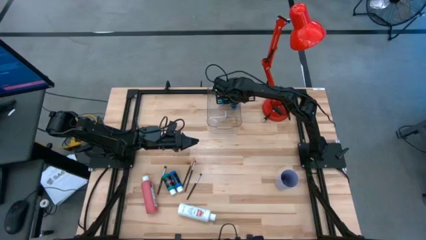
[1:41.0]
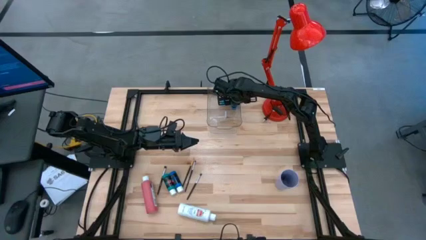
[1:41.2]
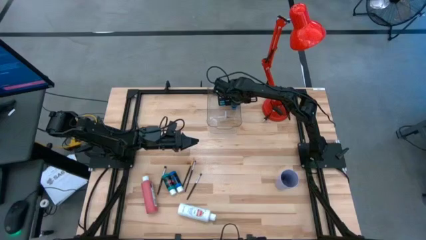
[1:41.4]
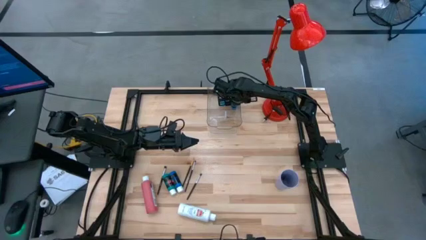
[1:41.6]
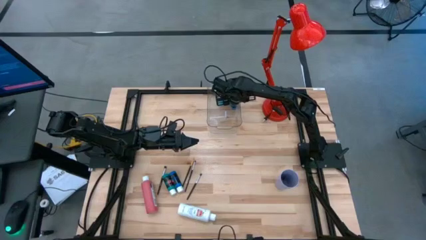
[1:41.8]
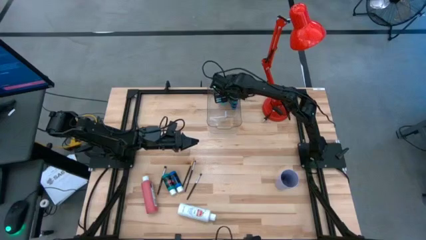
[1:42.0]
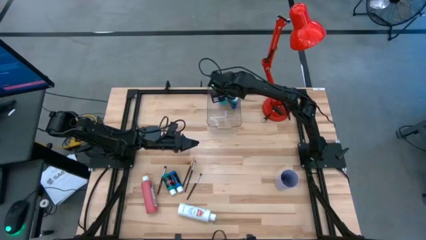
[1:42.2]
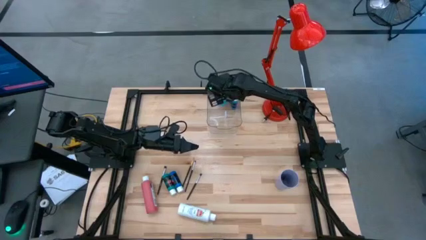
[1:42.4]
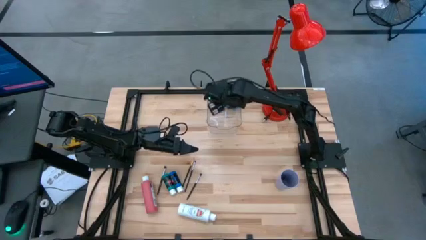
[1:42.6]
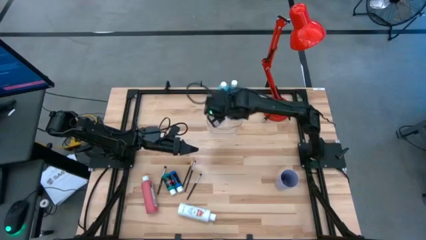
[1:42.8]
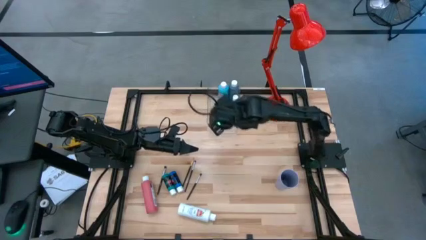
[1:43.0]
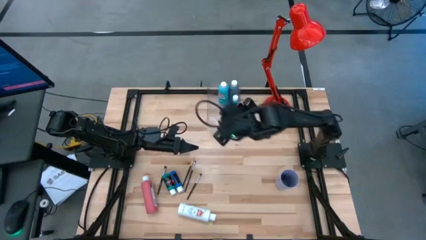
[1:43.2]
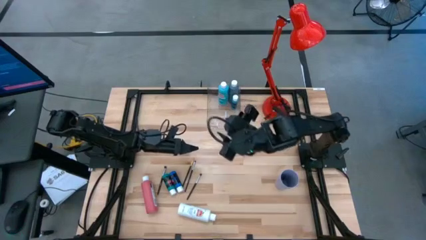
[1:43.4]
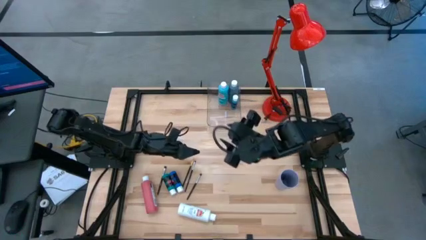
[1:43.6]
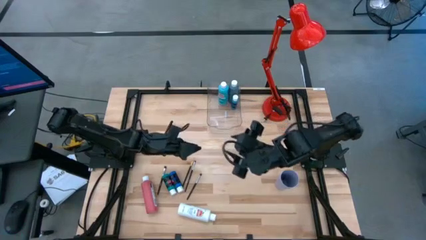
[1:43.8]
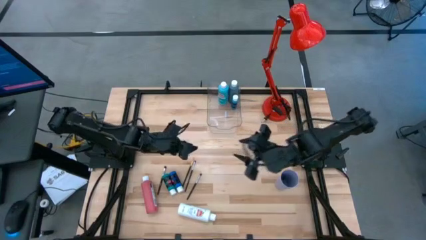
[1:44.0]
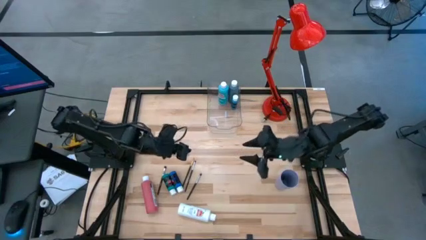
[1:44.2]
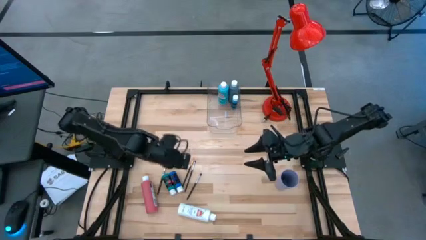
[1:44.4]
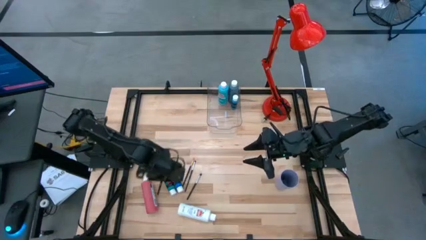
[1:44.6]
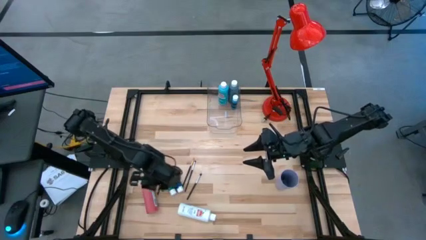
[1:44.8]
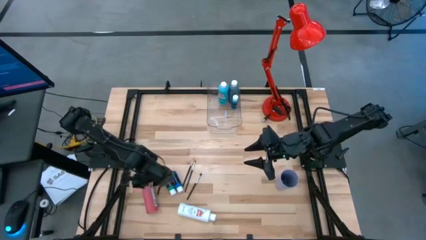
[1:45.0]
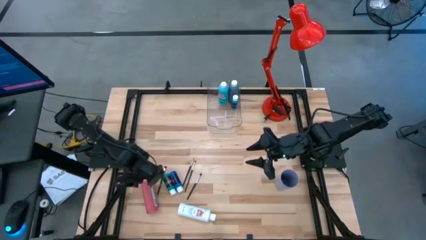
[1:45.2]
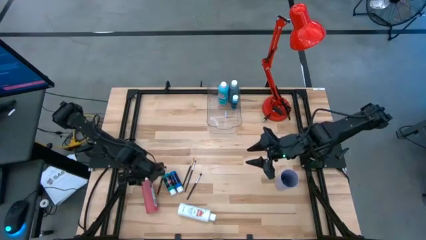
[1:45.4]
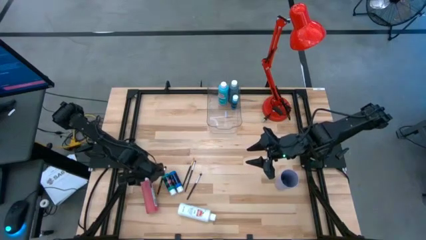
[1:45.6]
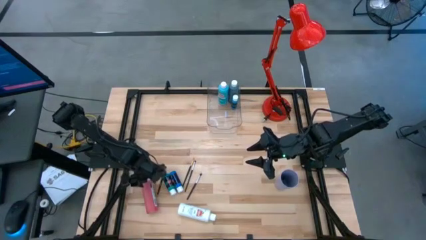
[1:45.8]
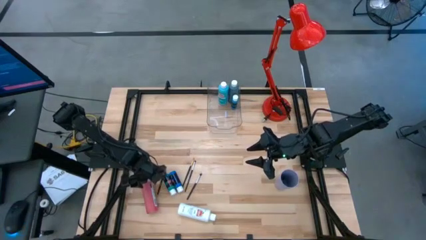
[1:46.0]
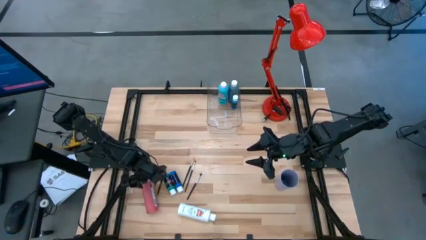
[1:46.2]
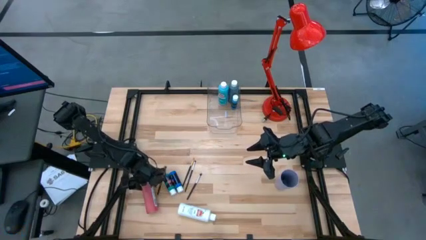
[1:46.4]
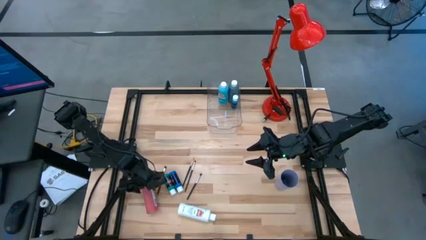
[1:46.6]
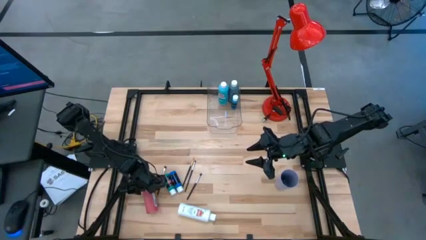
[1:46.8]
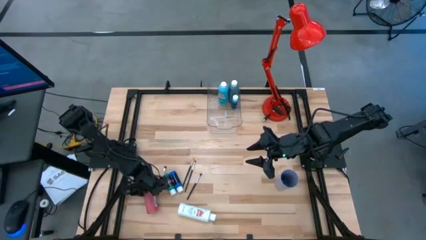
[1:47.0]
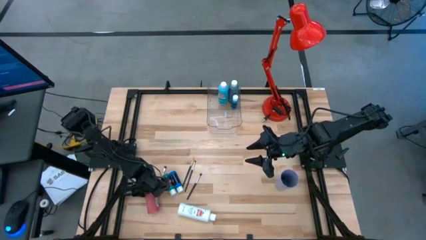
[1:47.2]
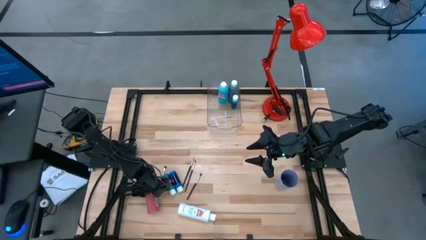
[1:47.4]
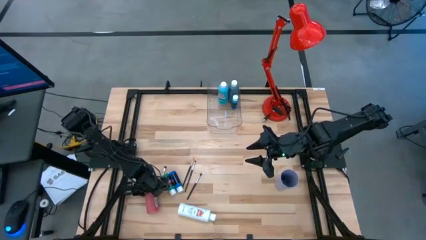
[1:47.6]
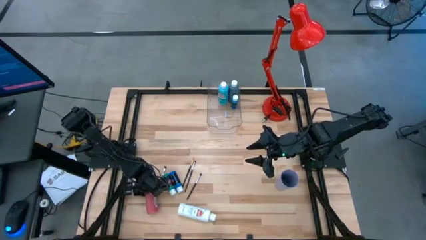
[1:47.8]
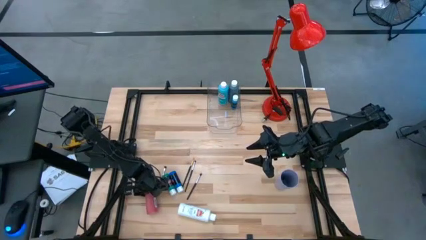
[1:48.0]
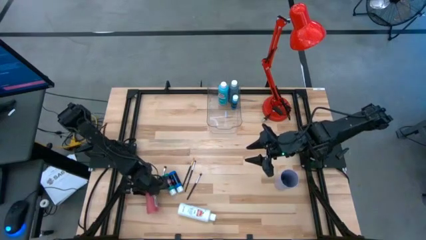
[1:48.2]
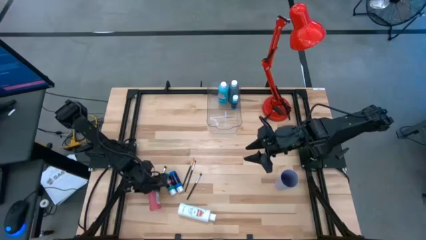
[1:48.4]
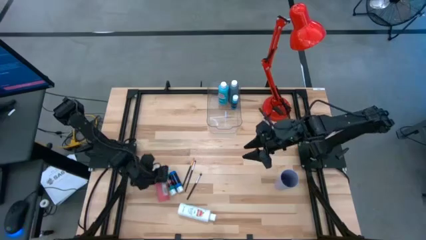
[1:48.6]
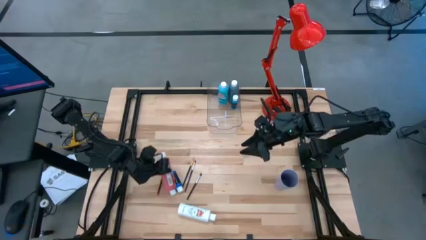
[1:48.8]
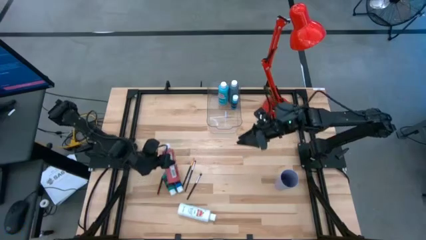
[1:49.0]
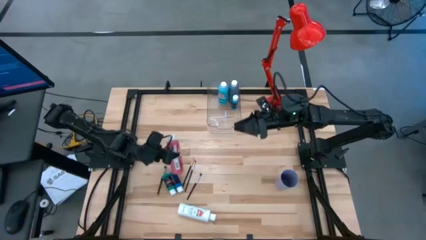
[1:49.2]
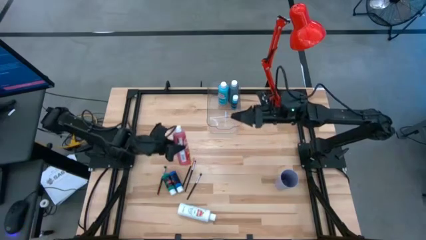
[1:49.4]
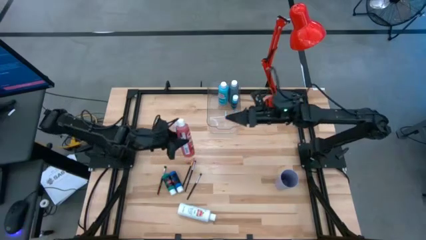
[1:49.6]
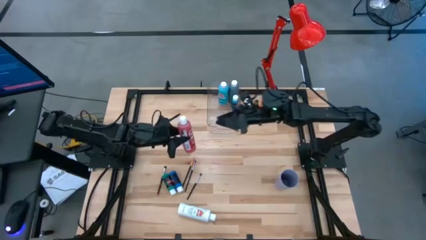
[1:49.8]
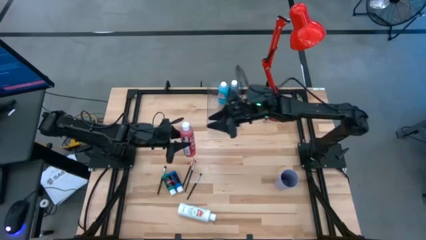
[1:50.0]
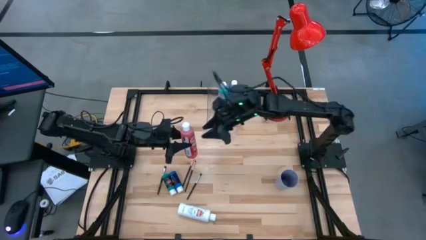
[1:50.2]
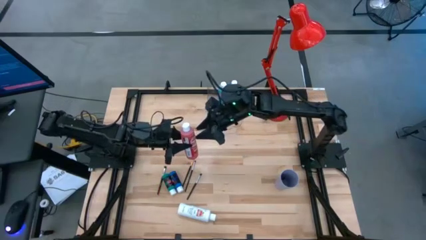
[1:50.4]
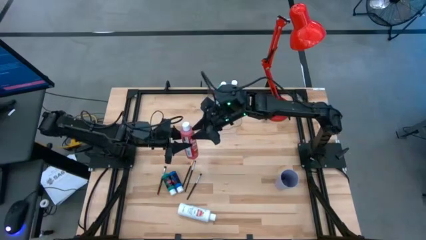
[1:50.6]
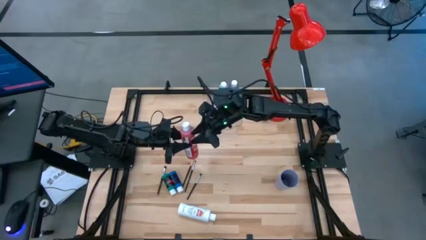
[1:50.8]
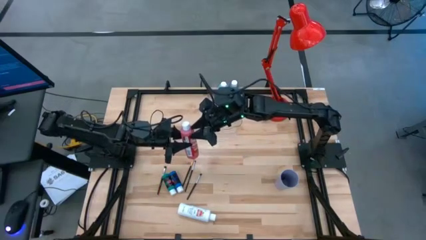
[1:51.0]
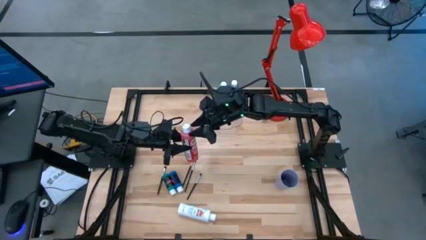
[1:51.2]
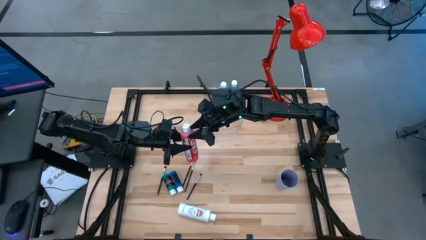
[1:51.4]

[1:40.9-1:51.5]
Task: Pick & Place Paint Supplies
Put the red paint bottle into the transparent bin

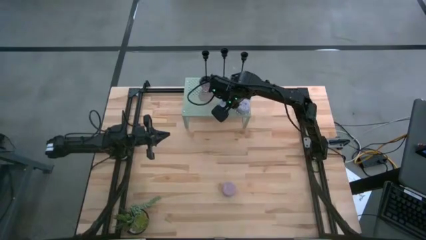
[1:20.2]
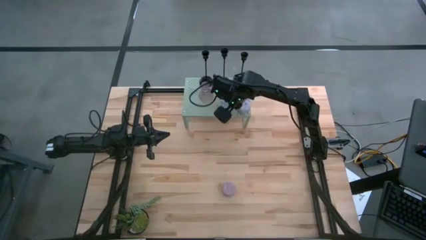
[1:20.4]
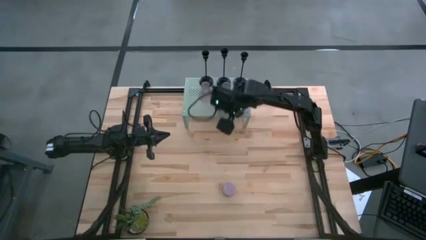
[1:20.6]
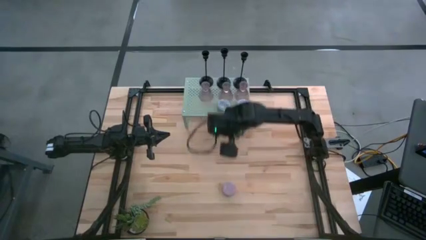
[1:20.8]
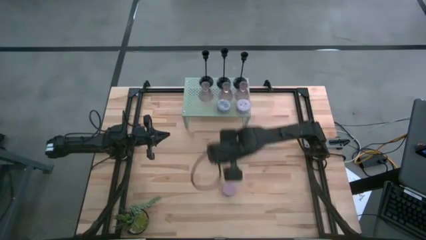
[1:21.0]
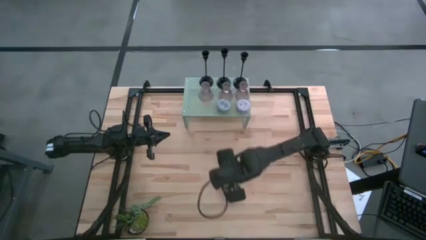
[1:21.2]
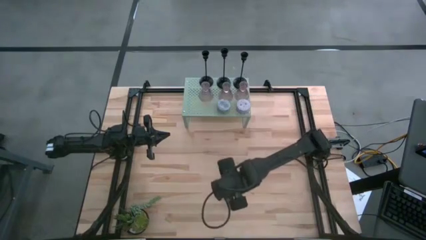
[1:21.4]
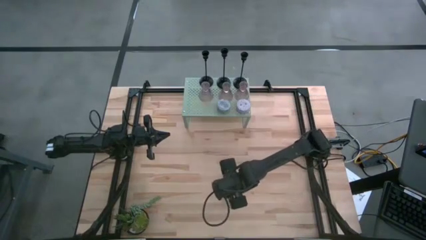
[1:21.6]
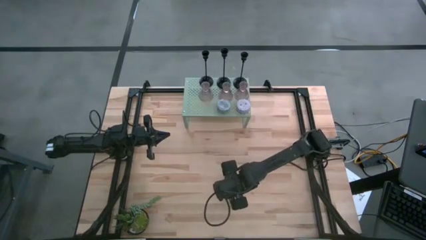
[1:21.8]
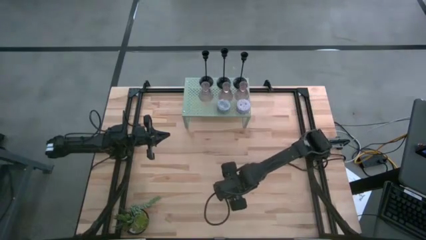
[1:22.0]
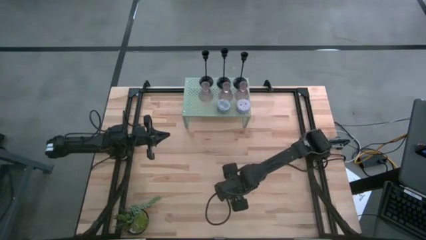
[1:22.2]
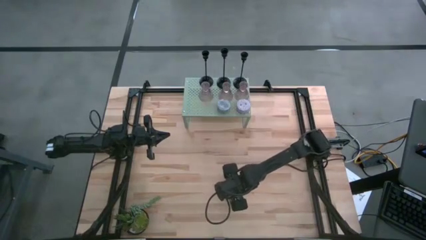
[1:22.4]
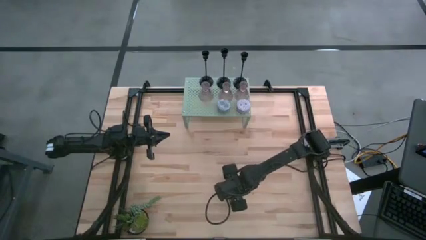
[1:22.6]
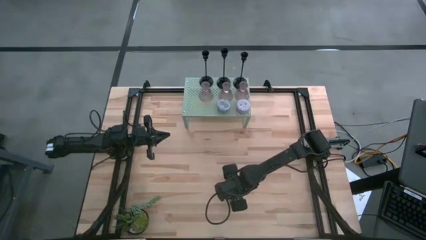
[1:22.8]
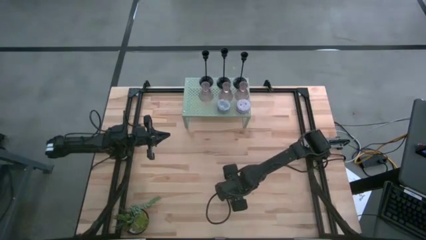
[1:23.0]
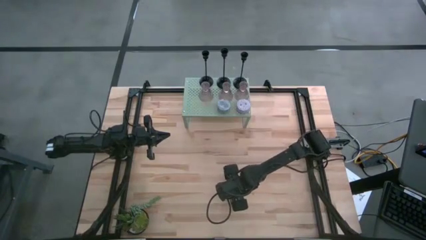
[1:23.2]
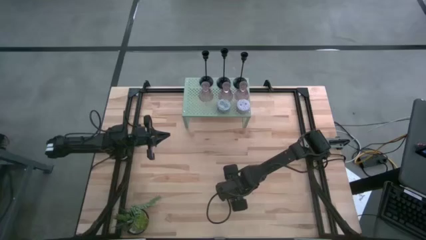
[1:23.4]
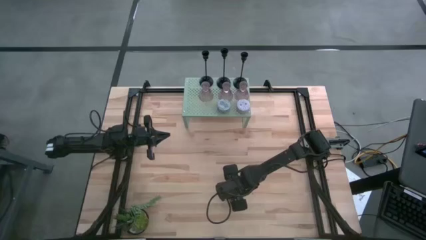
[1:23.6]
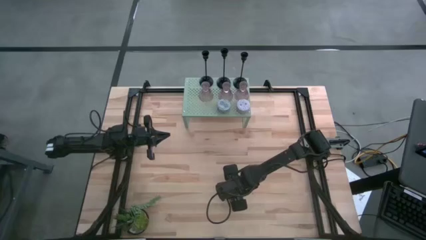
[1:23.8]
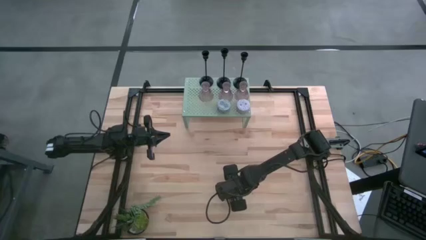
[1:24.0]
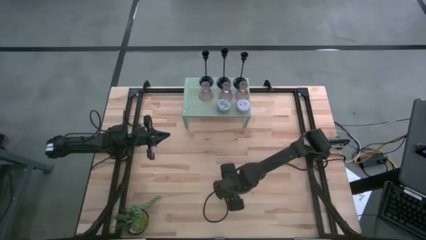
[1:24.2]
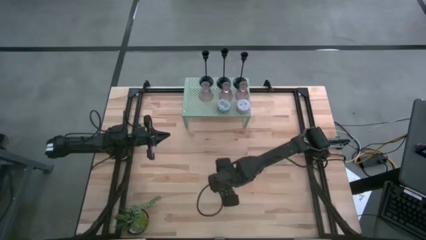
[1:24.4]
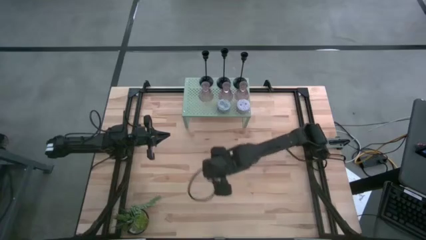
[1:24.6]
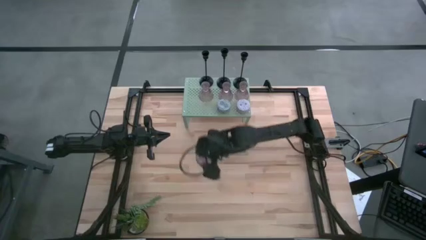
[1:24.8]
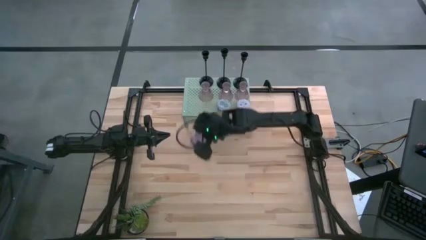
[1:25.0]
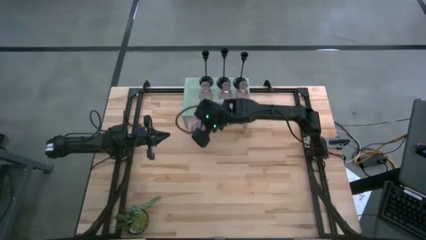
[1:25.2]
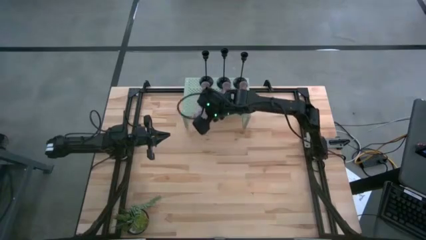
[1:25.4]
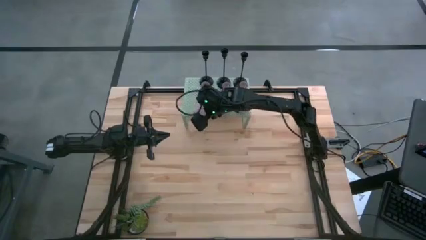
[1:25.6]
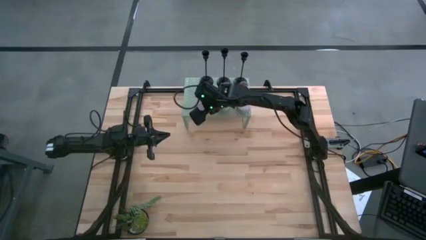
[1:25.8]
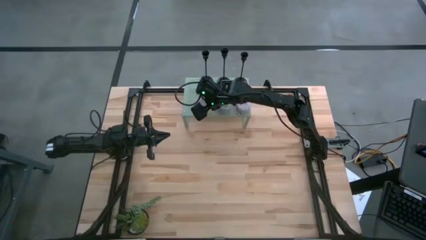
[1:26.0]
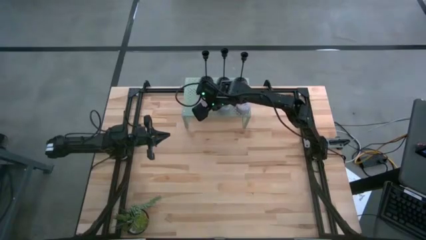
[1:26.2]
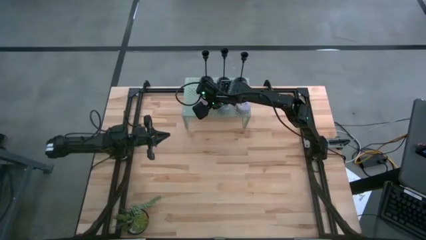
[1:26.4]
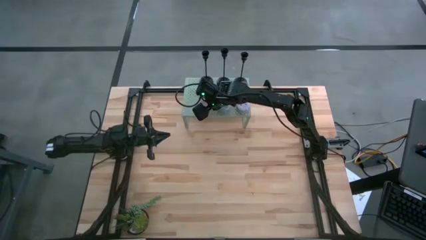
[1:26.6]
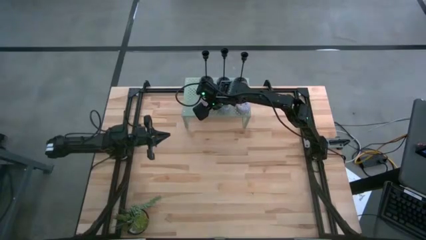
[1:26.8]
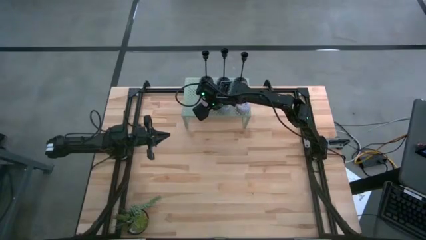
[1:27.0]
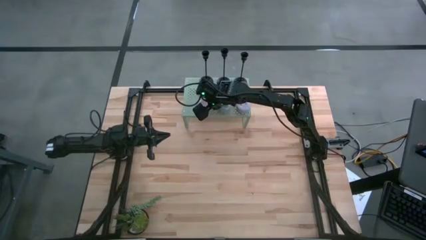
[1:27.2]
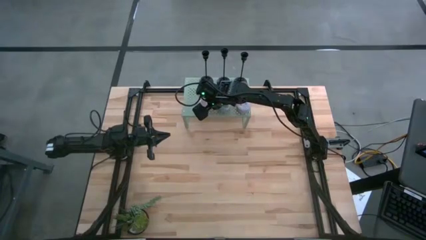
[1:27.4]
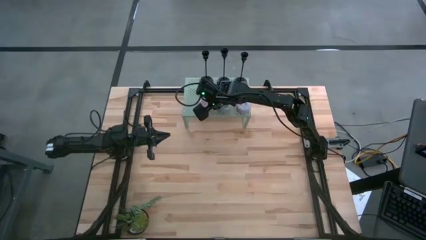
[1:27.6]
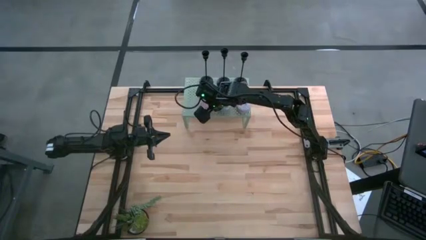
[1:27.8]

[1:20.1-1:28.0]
Task: Pick & Place candle stick holders
Put the pink scented candle on the shelf
